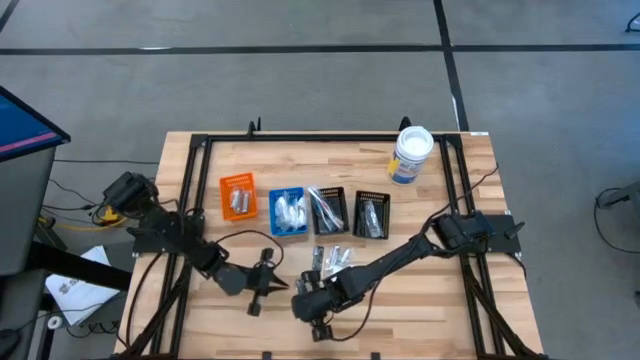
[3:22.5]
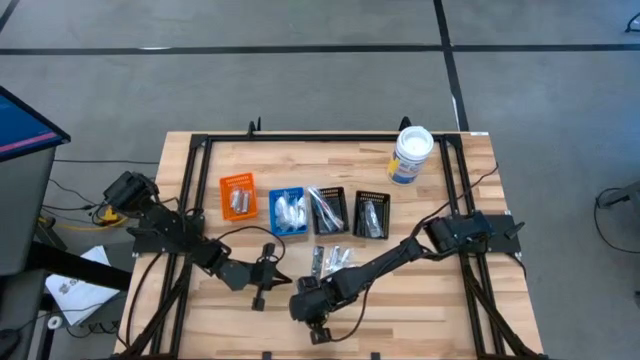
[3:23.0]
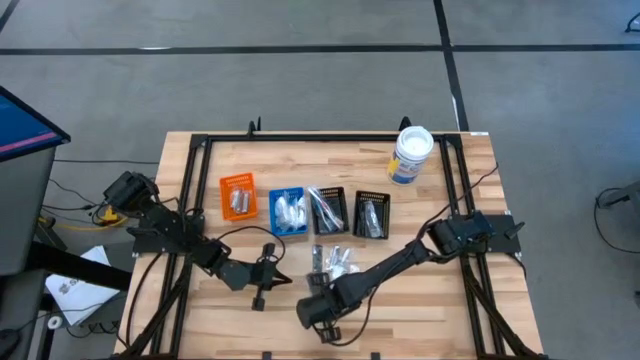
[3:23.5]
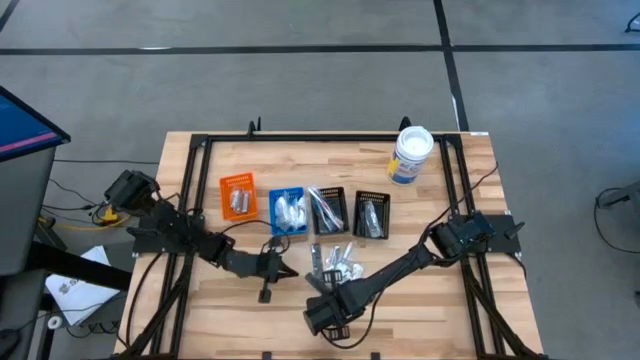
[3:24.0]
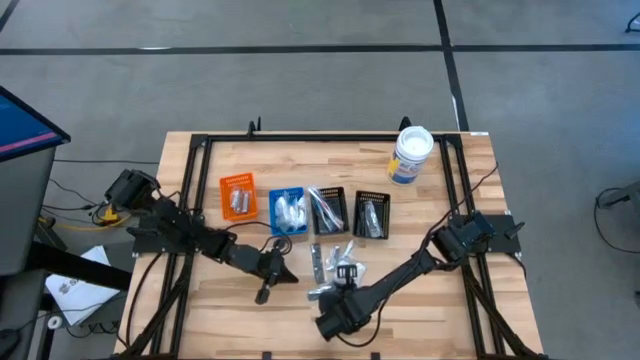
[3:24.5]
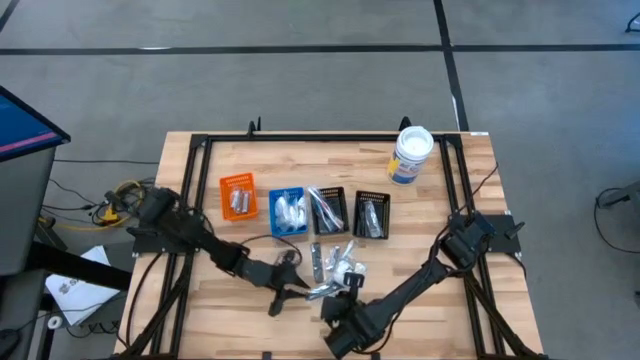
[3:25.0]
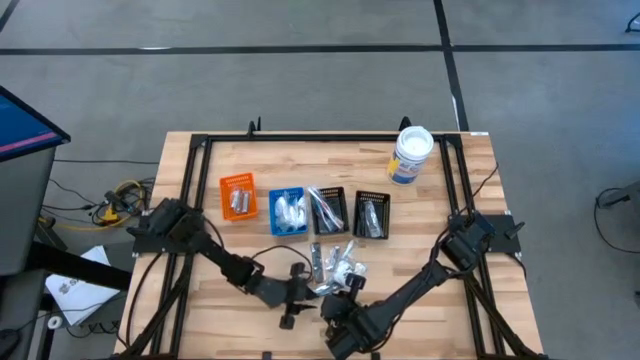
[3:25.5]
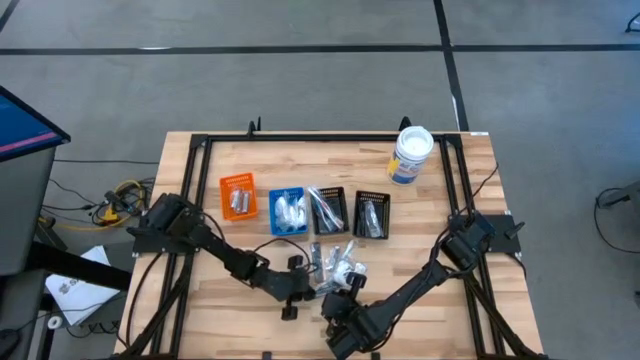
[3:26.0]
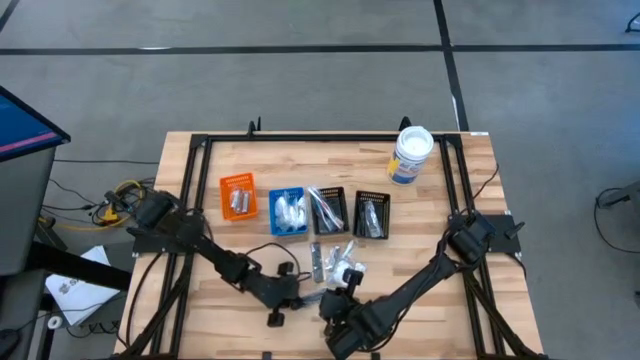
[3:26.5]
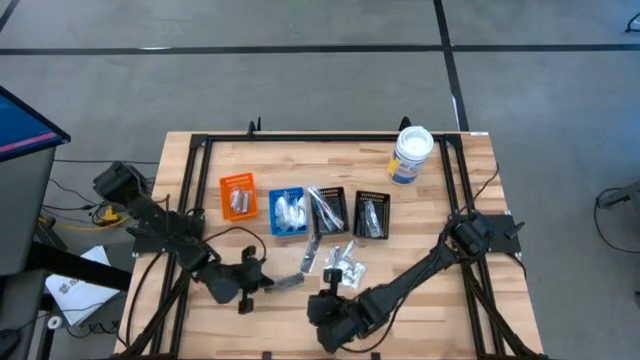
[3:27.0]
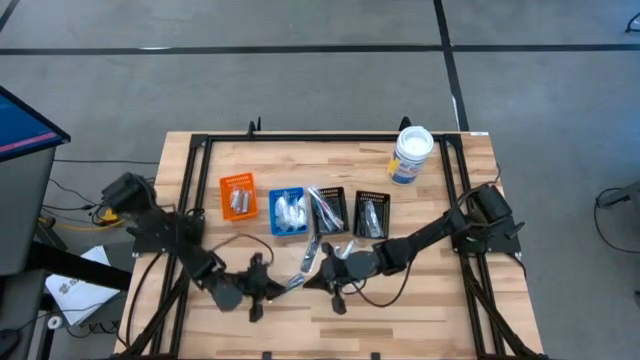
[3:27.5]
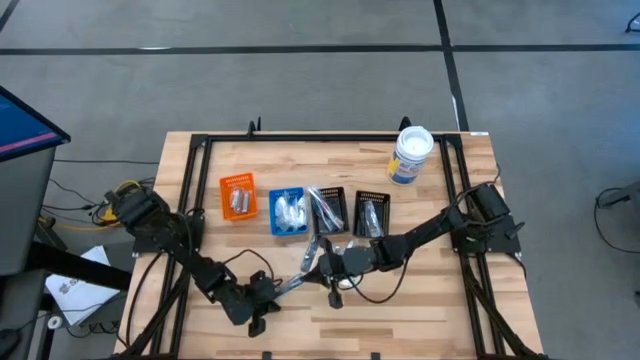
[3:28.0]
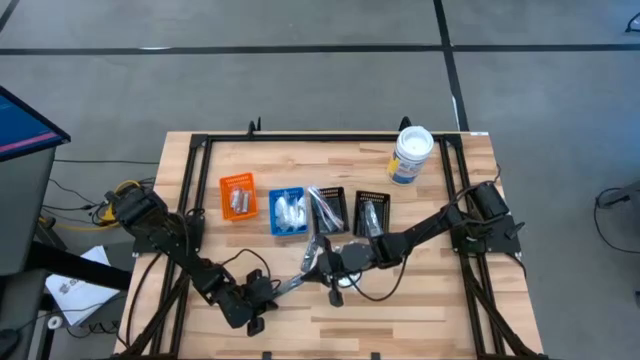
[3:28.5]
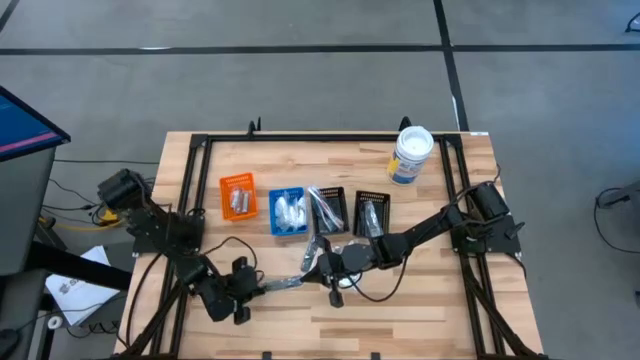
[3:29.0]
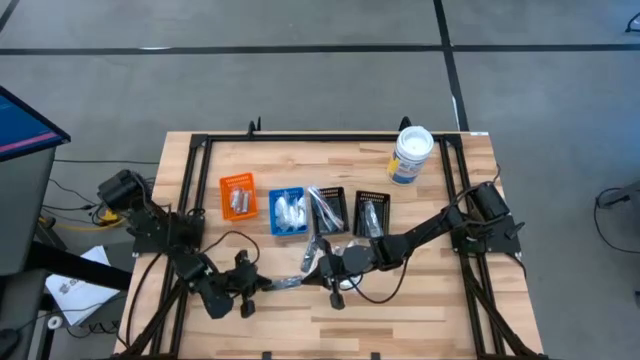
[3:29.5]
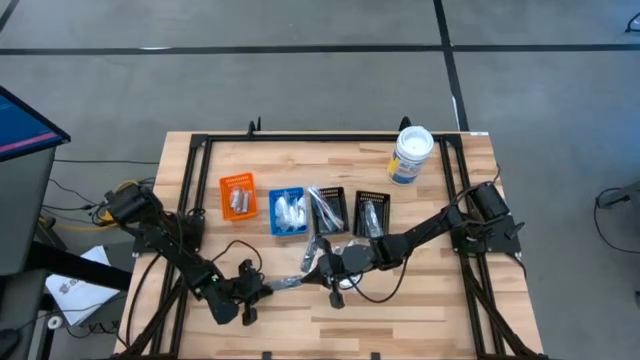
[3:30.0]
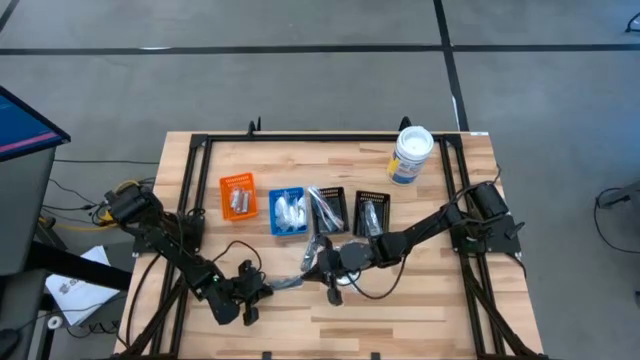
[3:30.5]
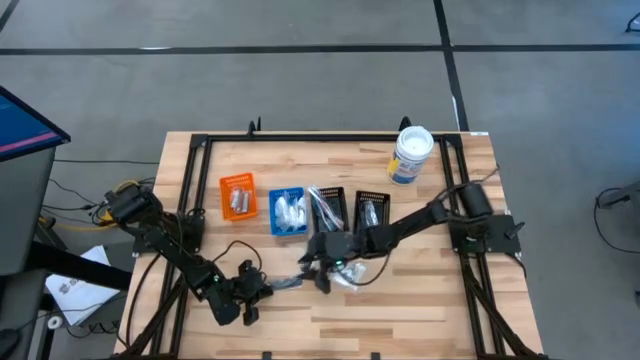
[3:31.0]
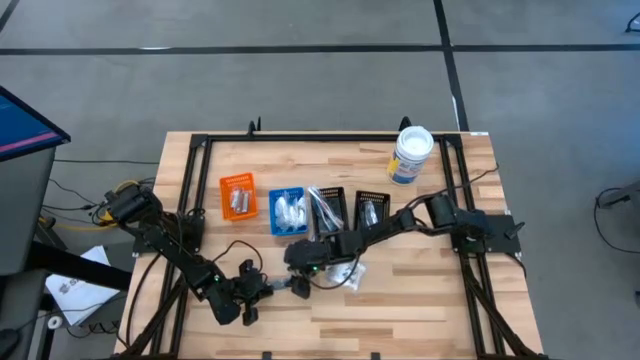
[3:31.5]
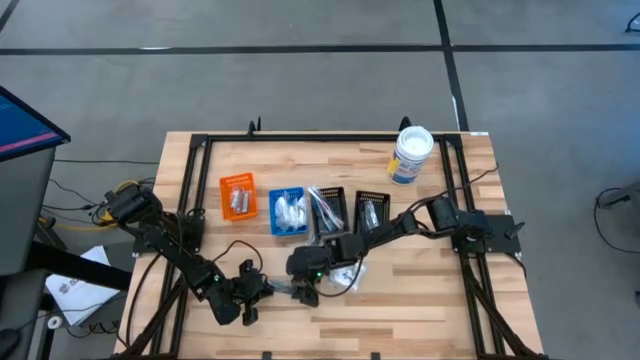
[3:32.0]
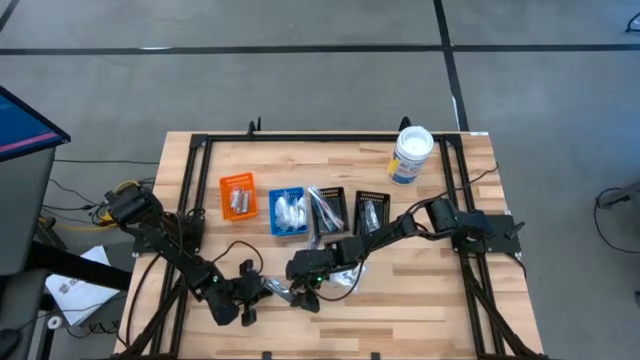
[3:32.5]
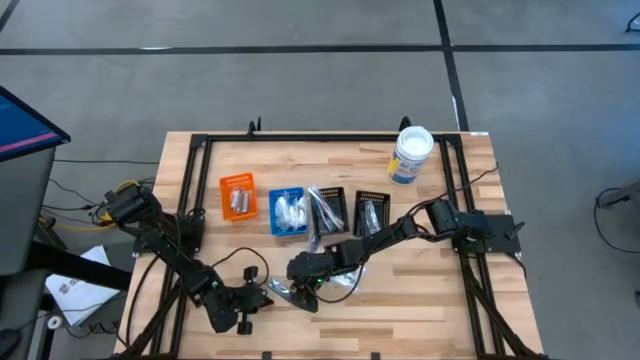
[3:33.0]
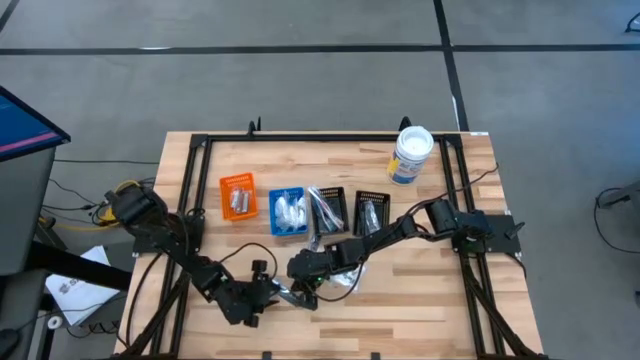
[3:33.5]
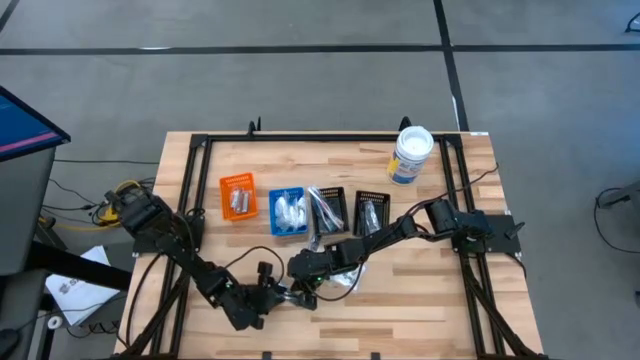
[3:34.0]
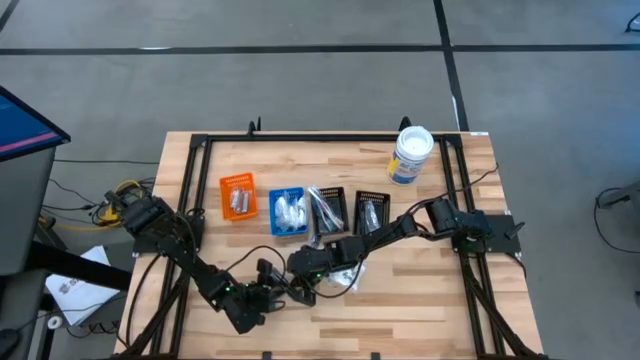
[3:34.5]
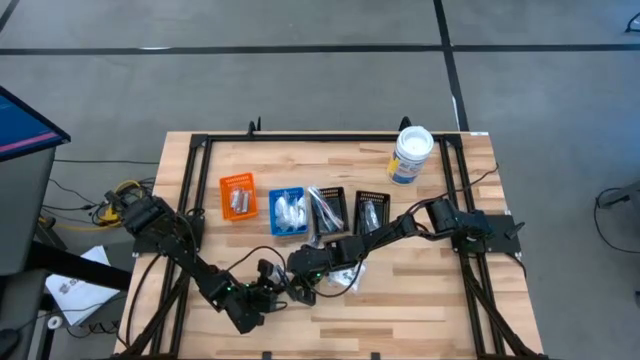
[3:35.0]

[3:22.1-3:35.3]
Task: Pick & Place Travel size toiletries
Put the black comb into the right black bin

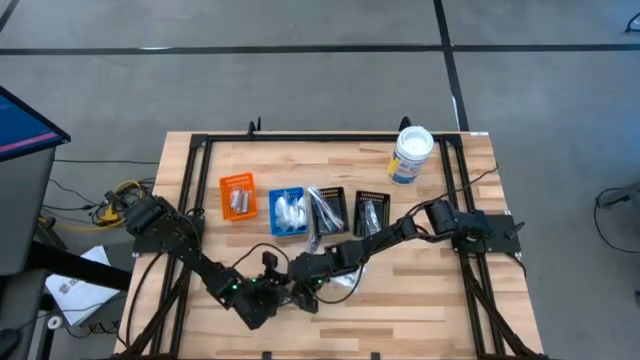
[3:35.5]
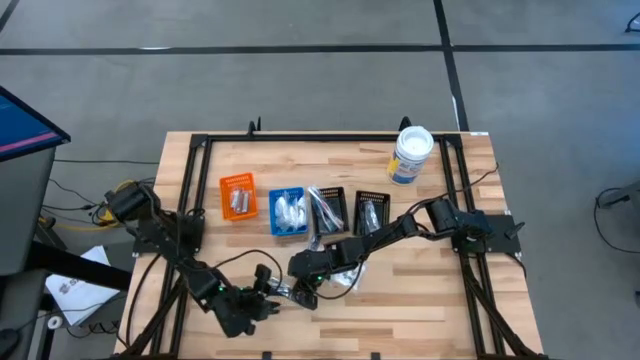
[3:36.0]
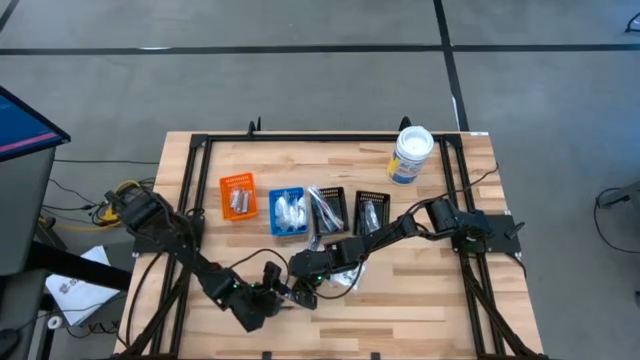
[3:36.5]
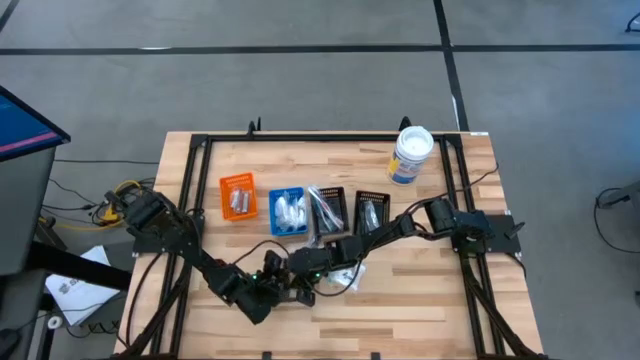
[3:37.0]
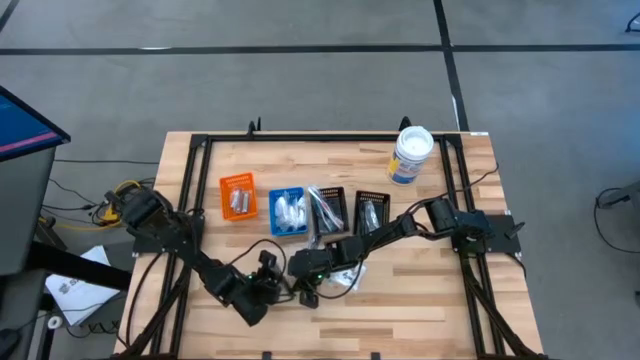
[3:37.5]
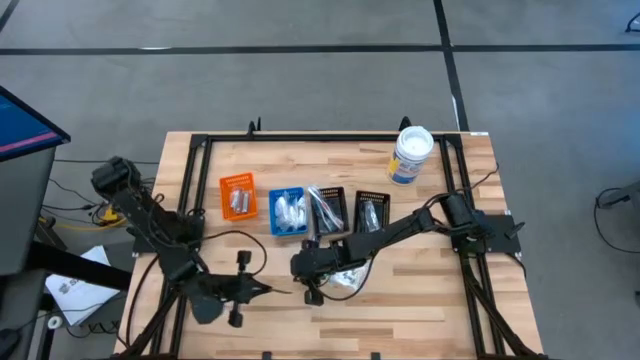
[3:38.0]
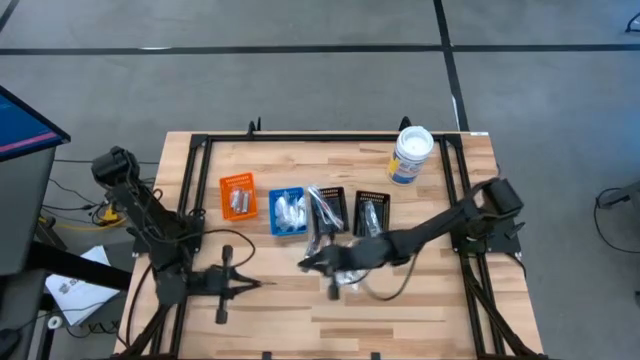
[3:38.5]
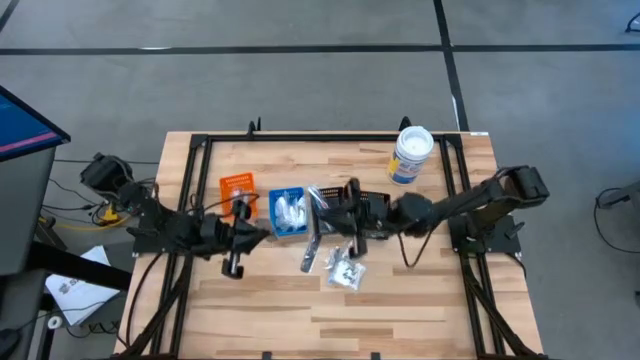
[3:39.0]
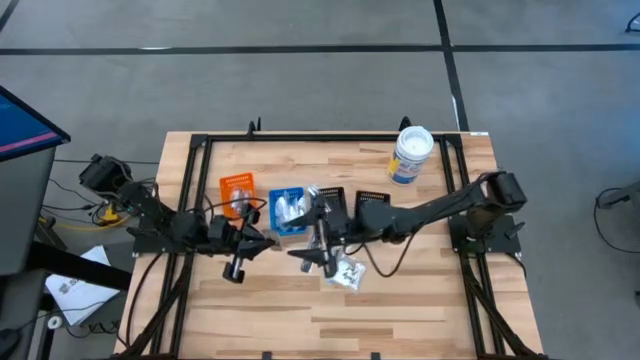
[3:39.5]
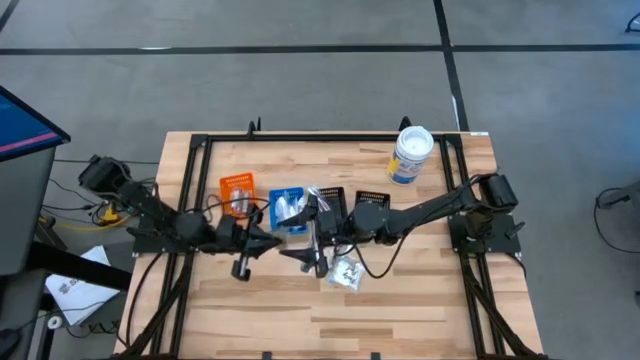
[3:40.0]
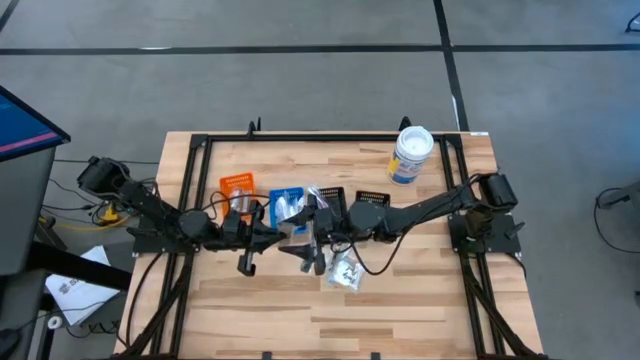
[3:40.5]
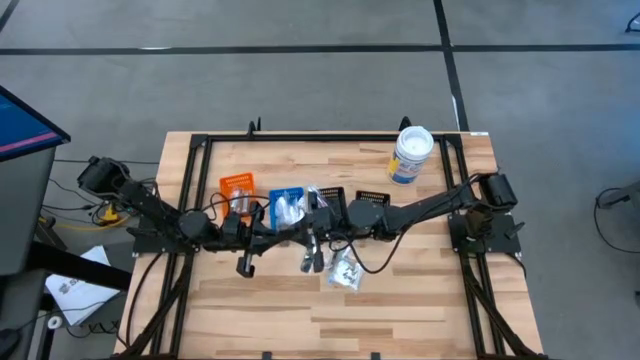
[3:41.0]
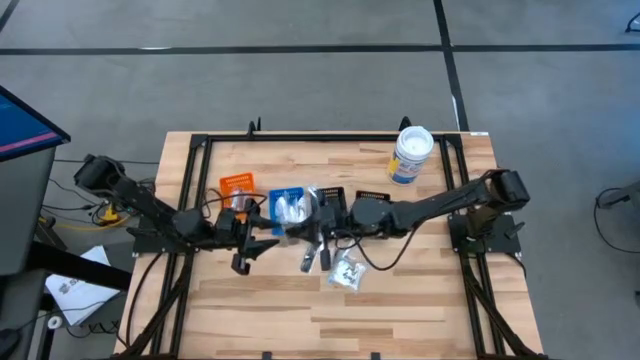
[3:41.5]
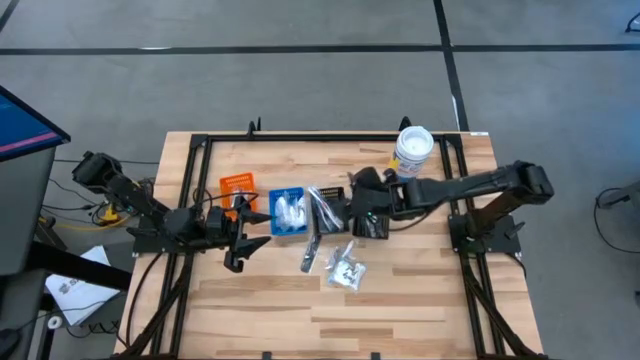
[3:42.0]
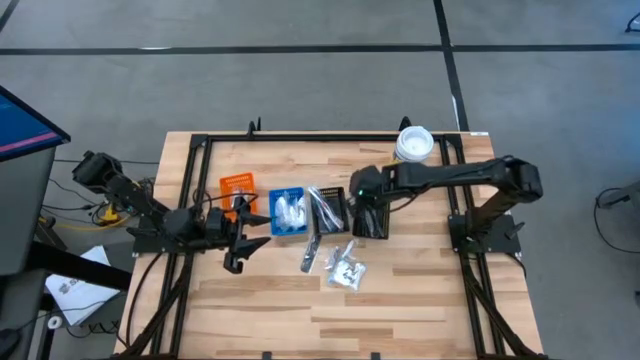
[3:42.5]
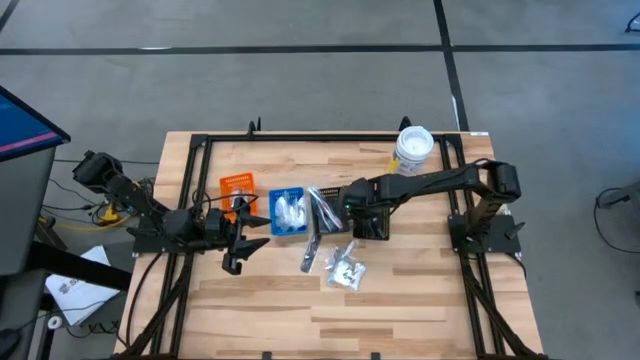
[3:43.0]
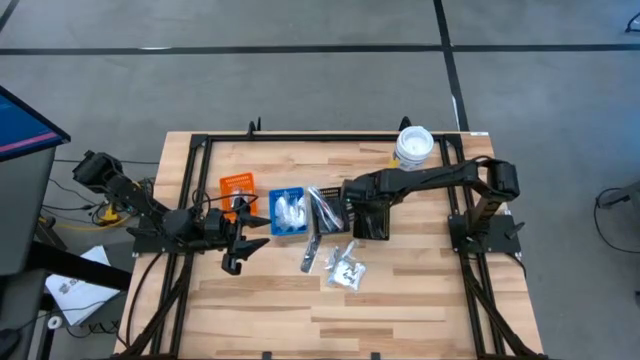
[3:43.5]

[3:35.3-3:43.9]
Put the black comb into the right black bin
